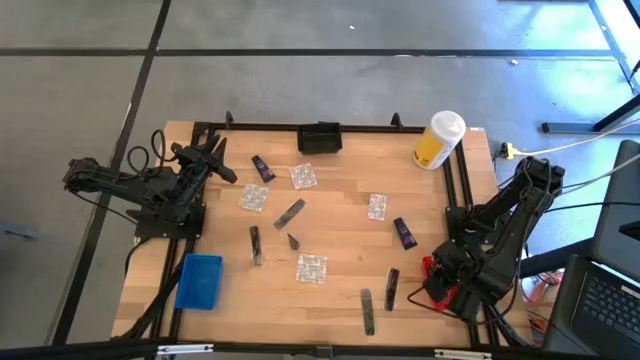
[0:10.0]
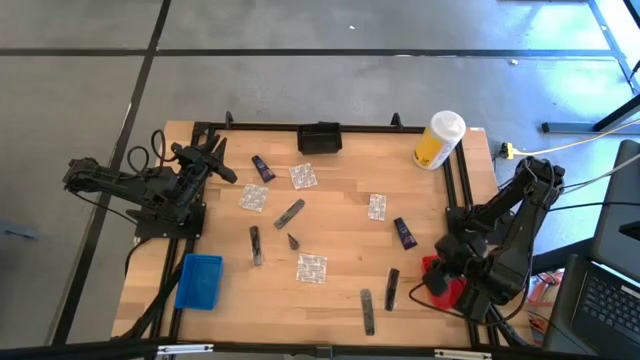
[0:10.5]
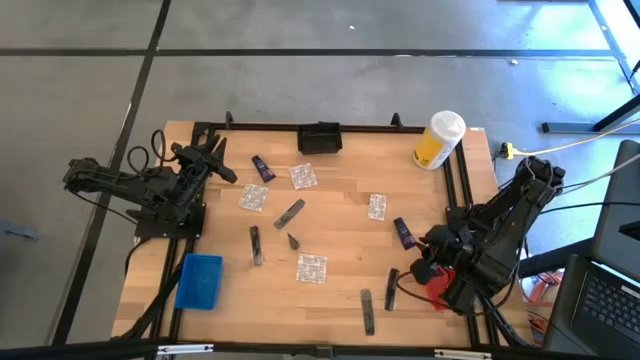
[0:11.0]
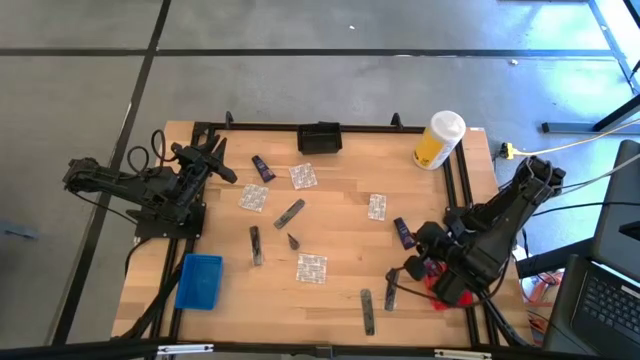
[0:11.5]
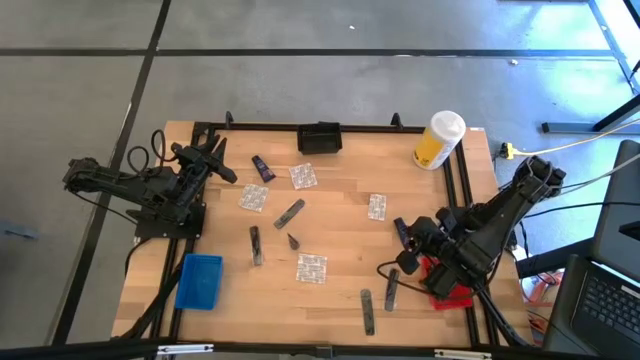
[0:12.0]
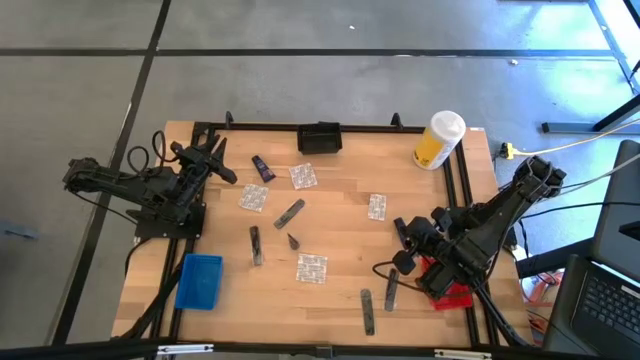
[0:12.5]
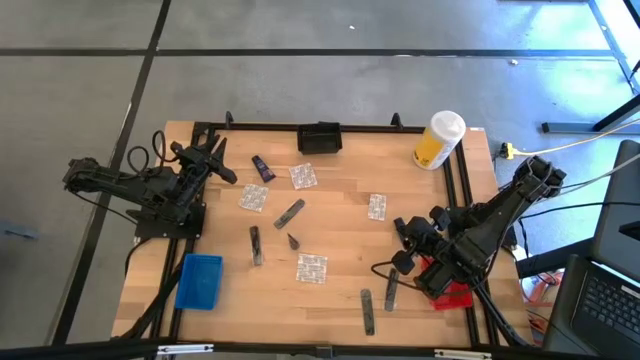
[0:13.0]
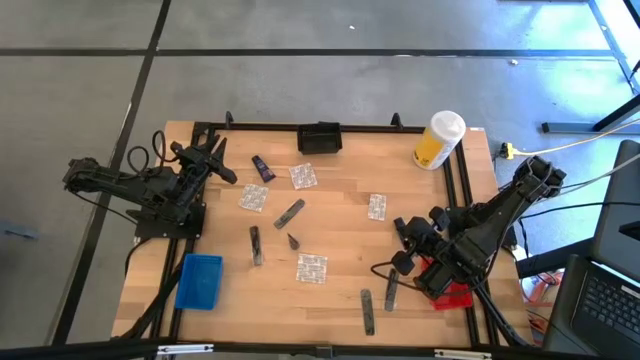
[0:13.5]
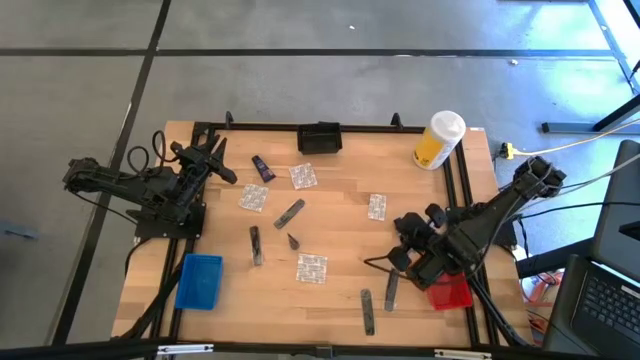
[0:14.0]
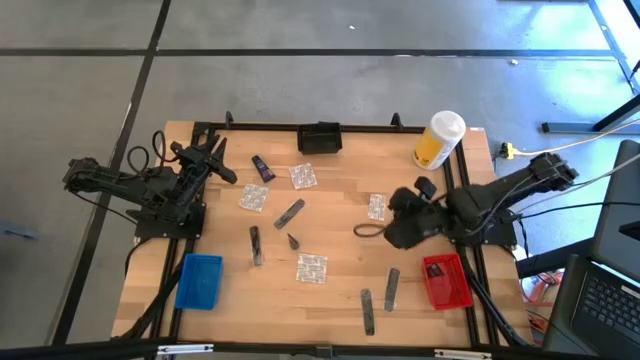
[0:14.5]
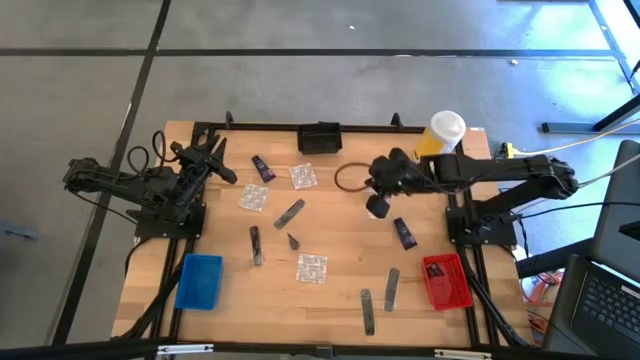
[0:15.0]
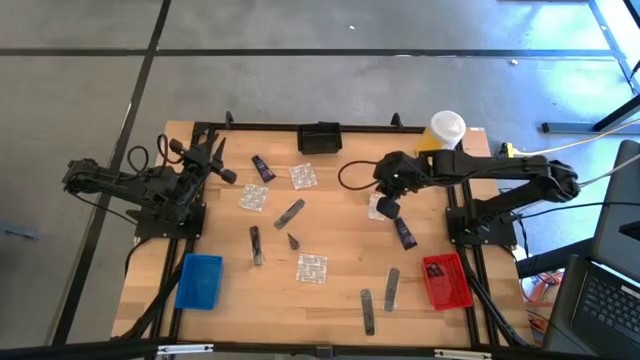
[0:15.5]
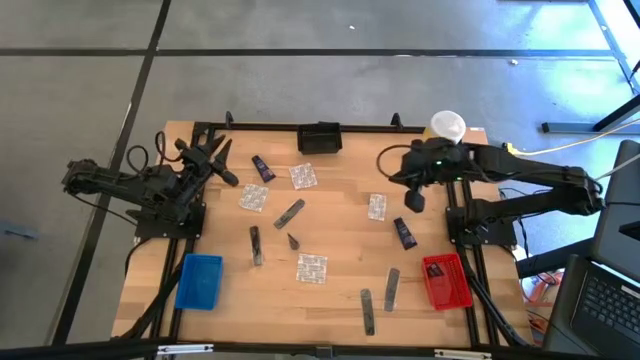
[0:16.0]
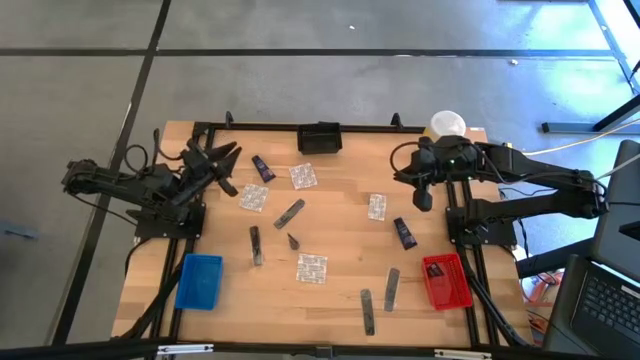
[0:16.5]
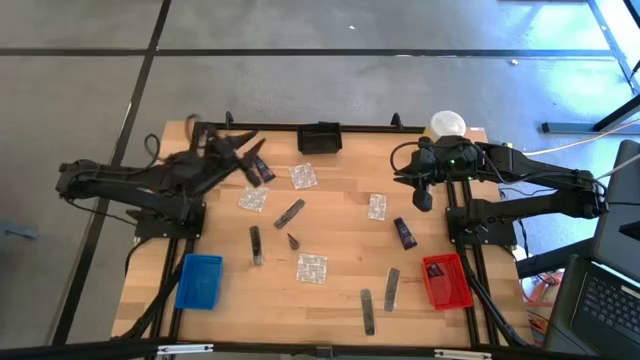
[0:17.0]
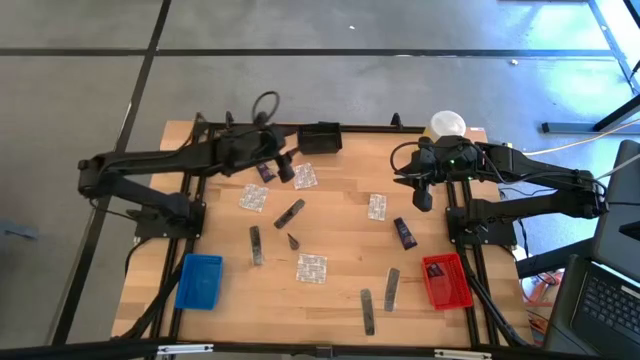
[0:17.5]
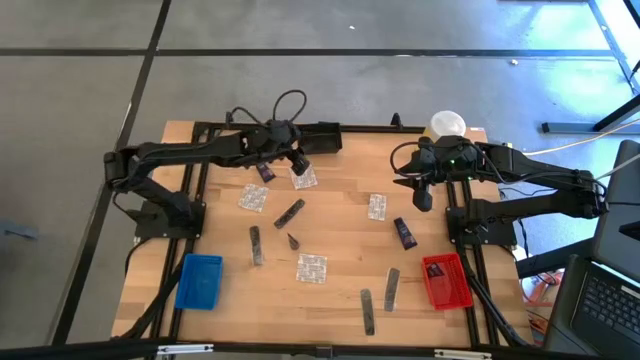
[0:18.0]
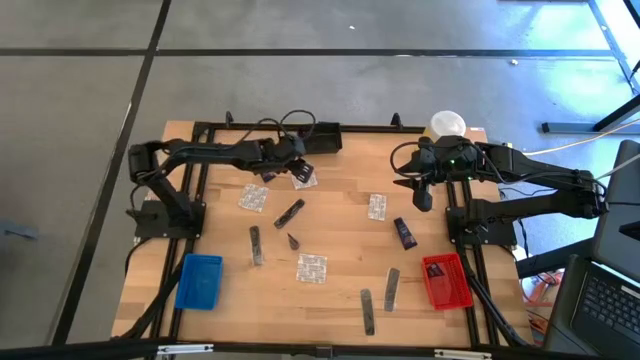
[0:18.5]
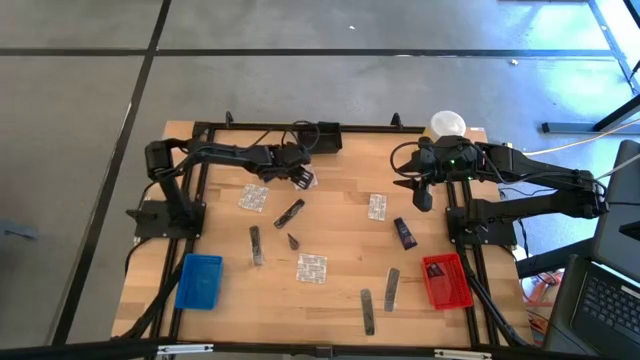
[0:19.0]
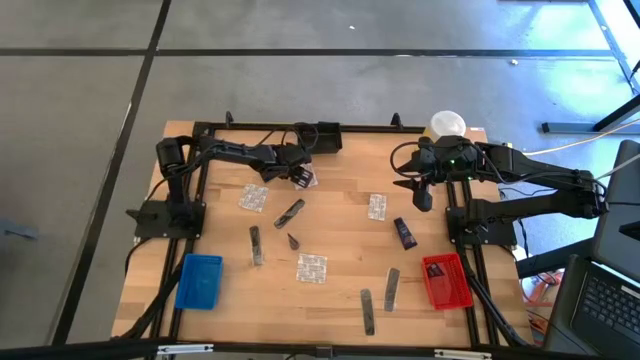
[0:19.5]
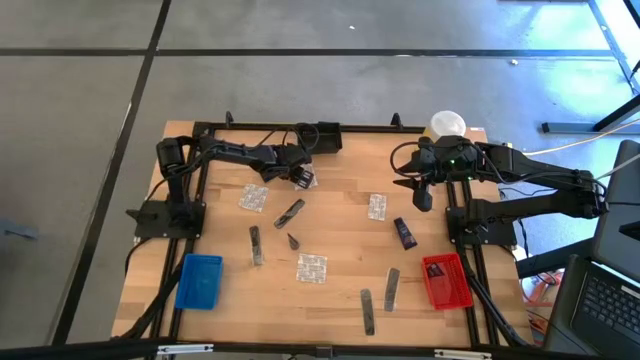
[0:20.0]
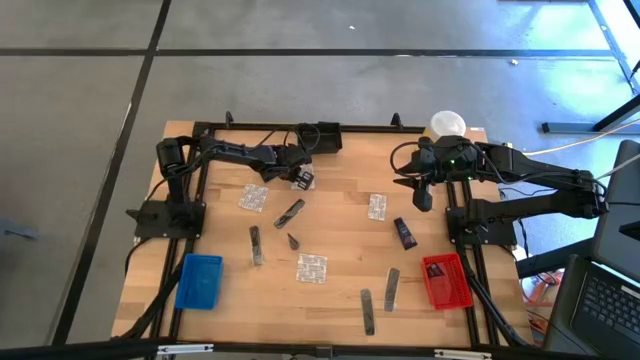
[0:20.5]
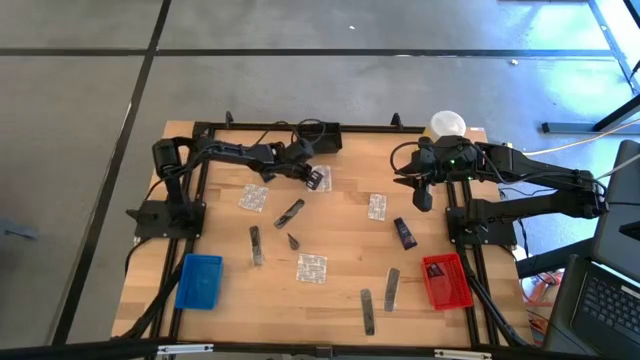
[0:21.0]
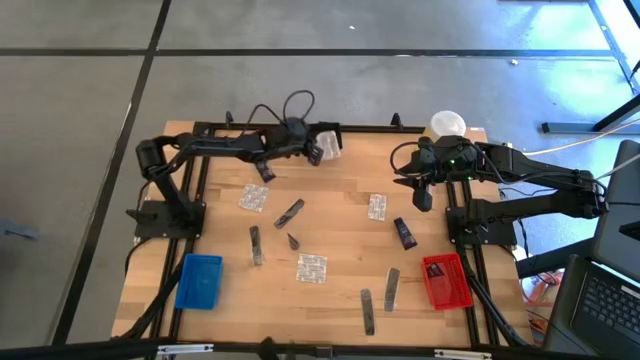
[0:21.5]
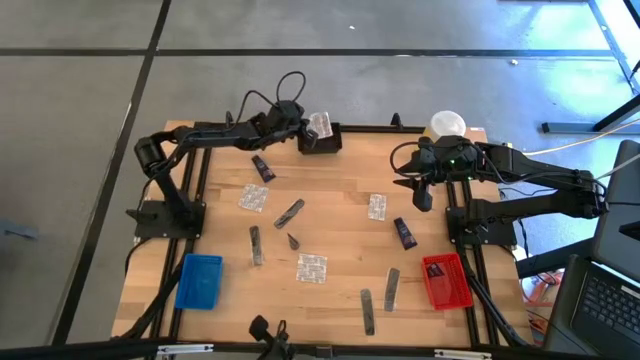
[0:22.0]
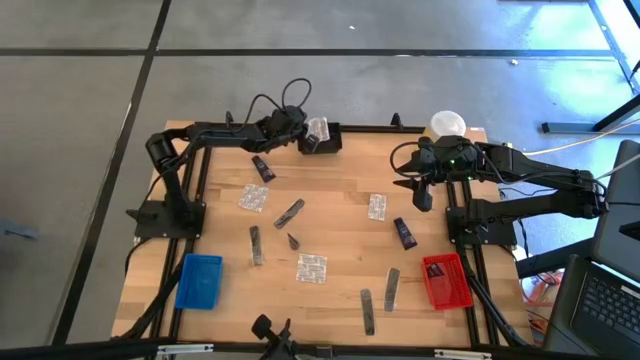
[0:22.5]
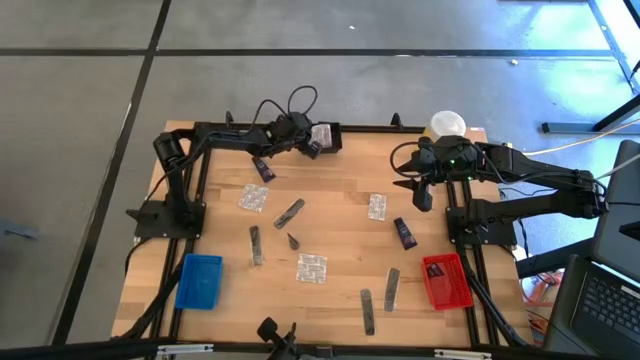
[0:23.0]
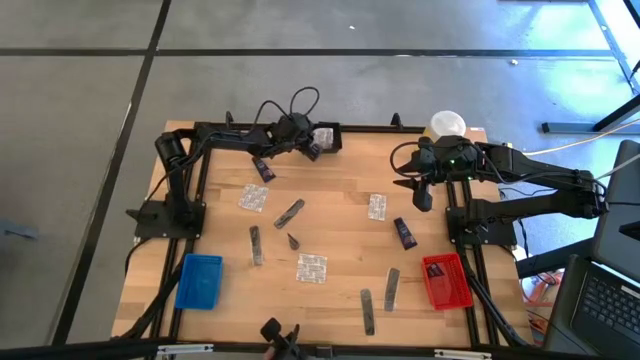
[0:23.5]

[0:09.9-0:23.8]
Task: Pick & Place Travel size toiletries
Put the white bandage into the black bin
